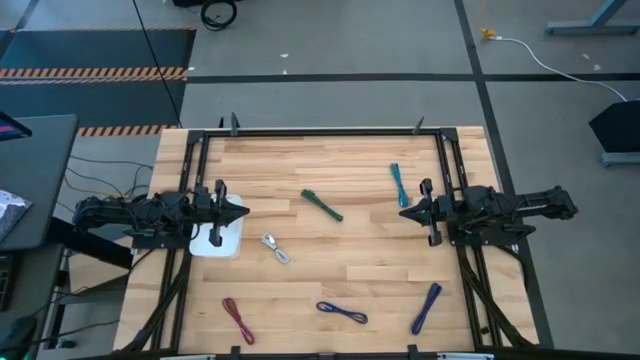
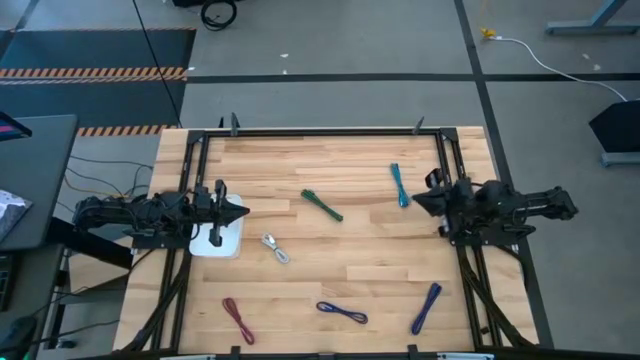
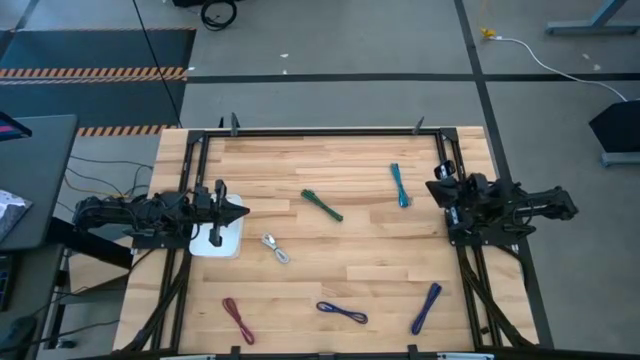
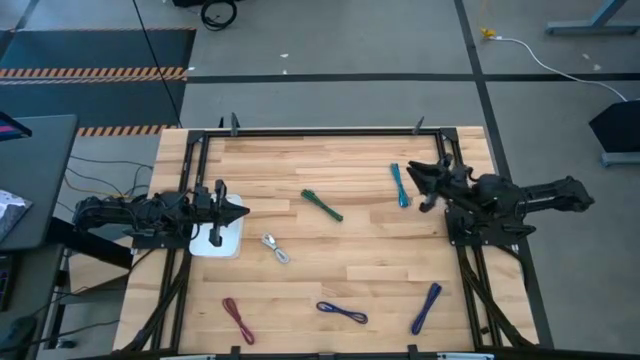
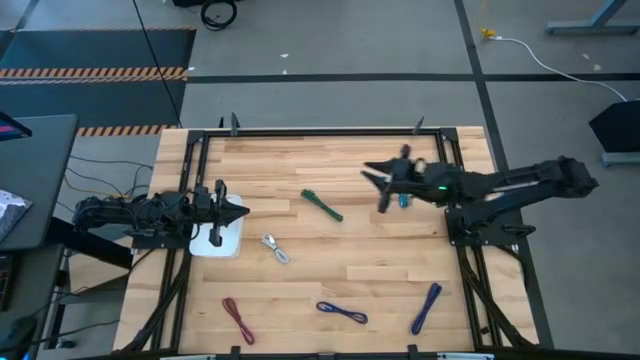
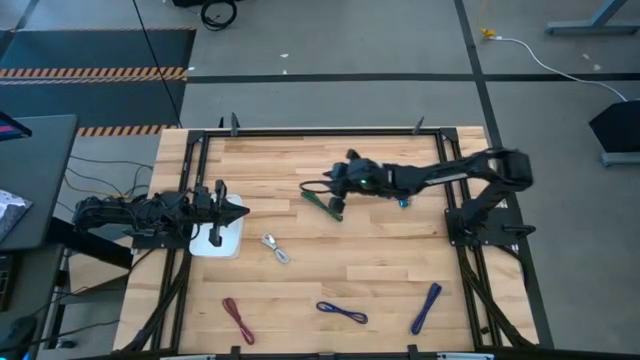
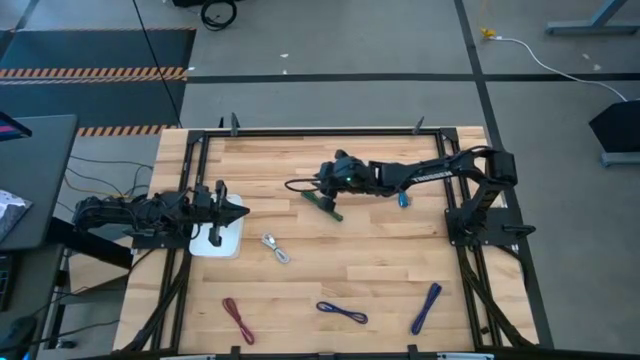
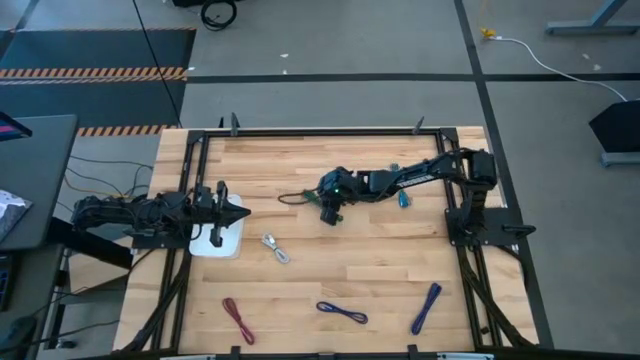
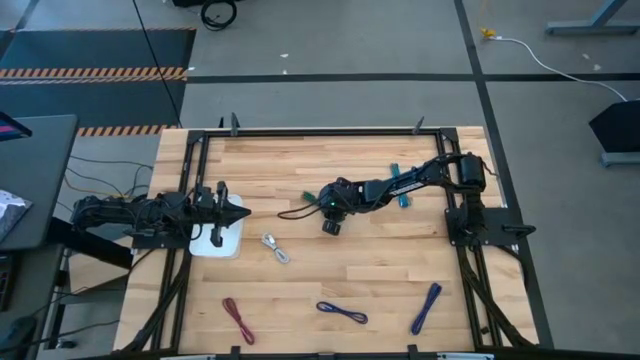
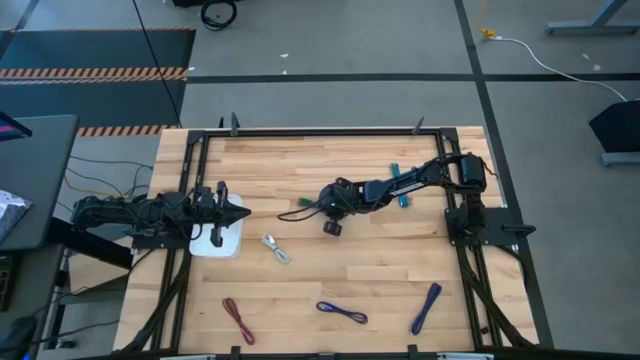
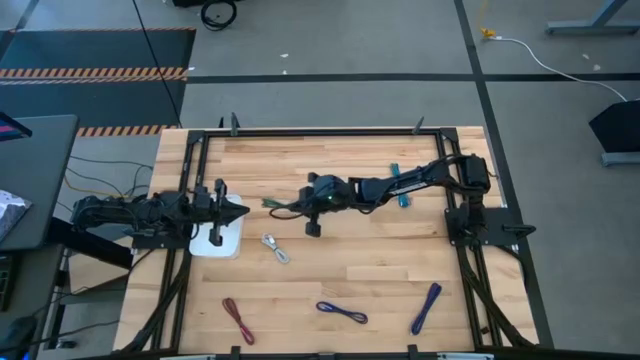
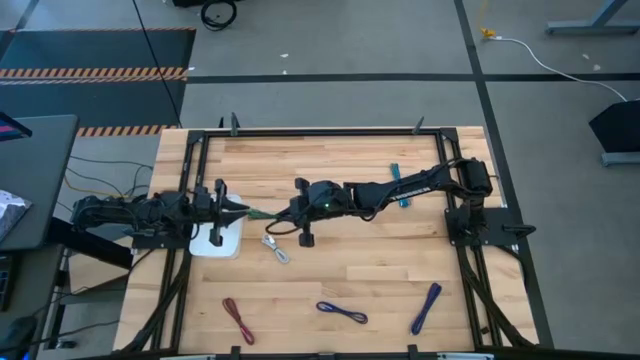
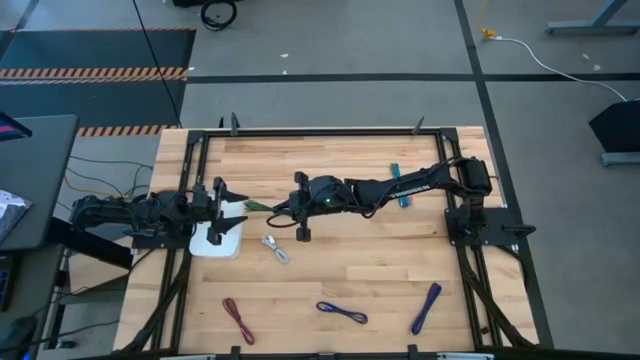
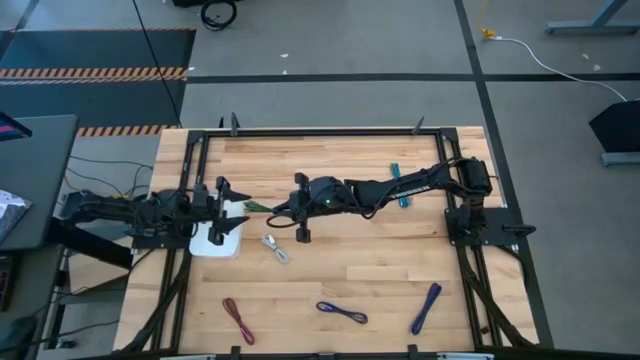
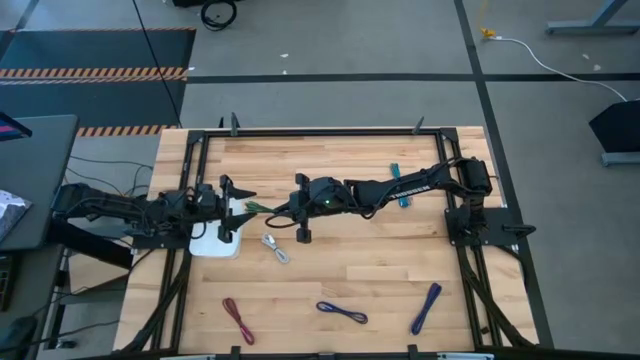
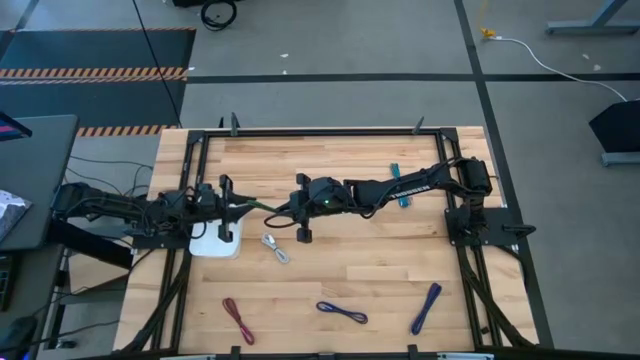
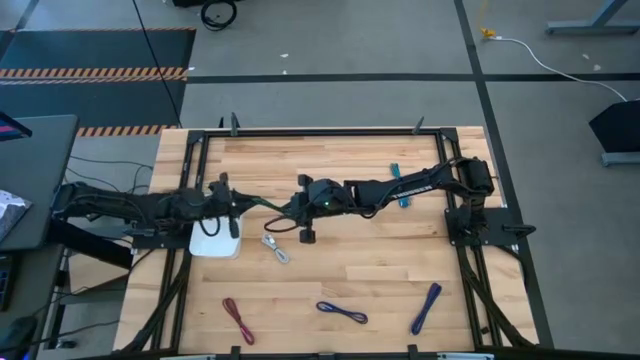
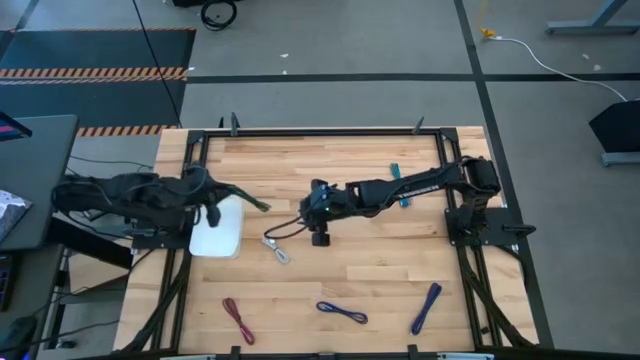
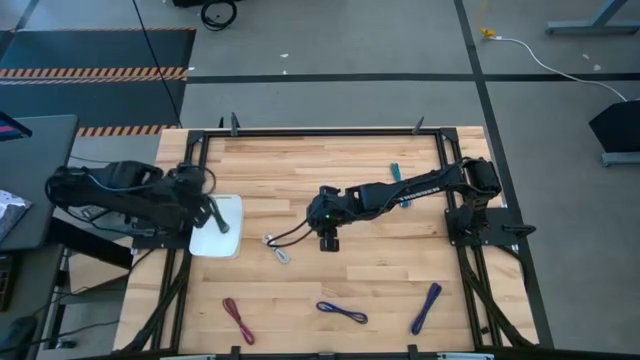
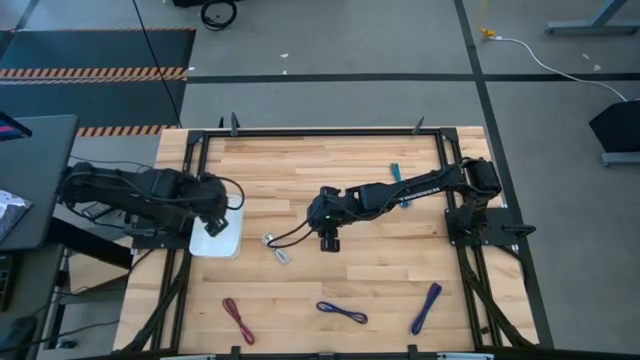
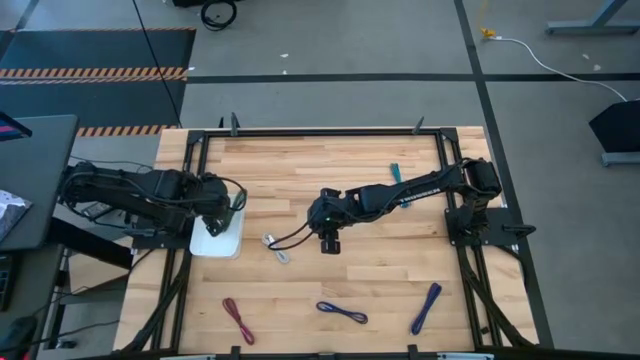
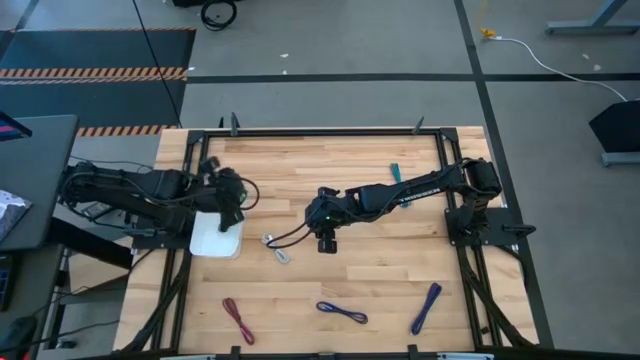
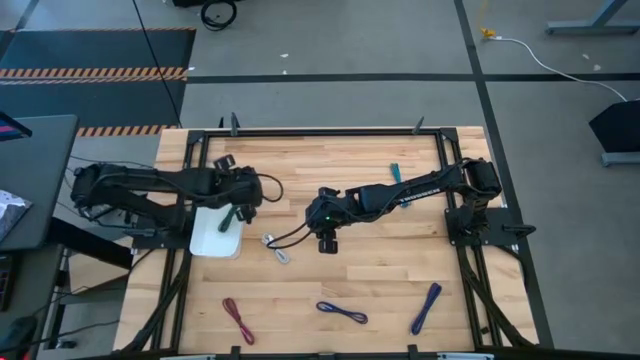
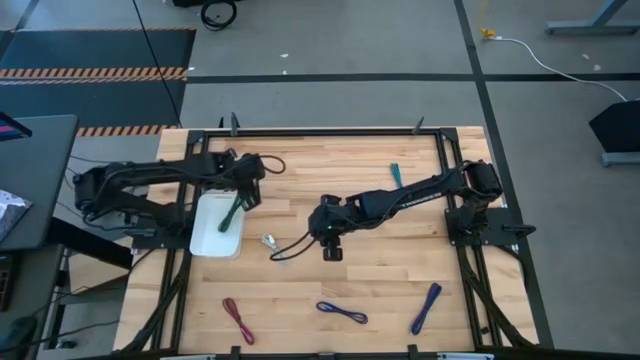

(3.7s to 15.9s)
Task: Pick and place USB-C Cables
Put the green charger cable into the white bin

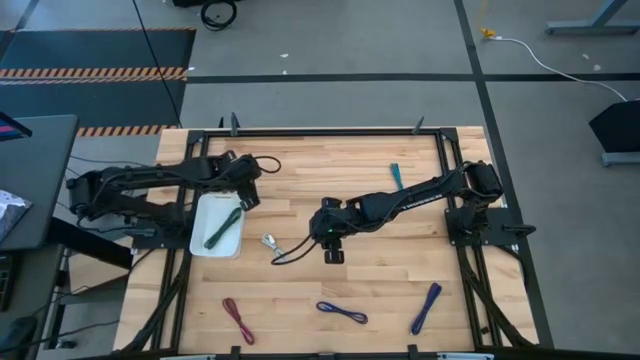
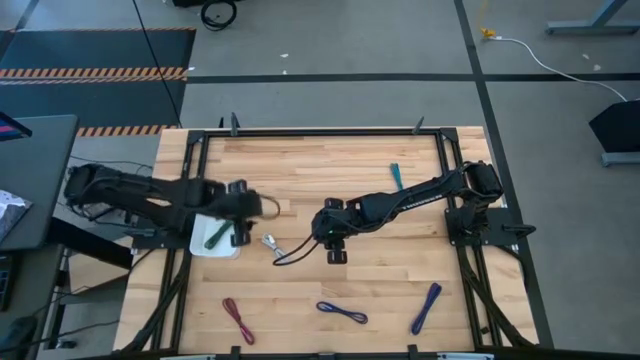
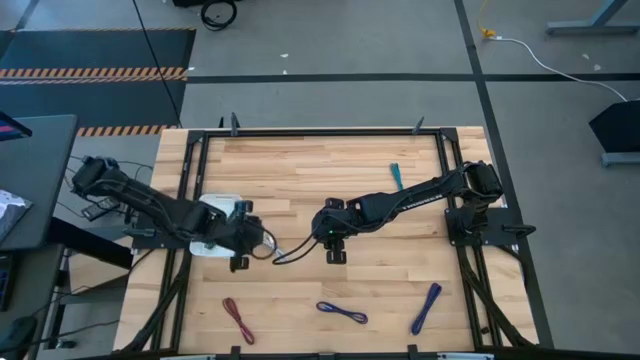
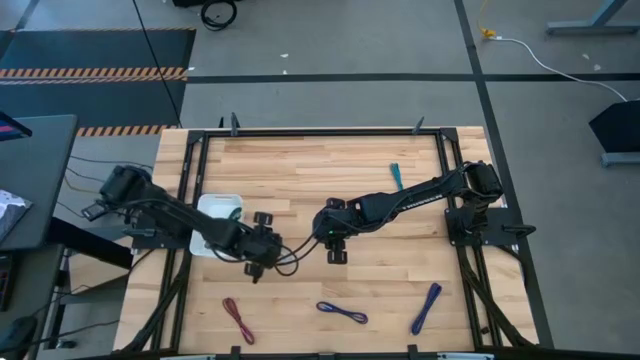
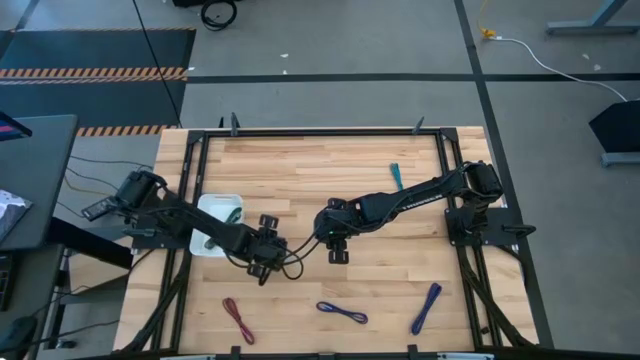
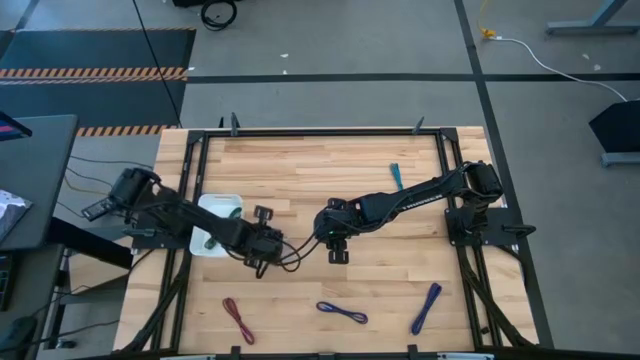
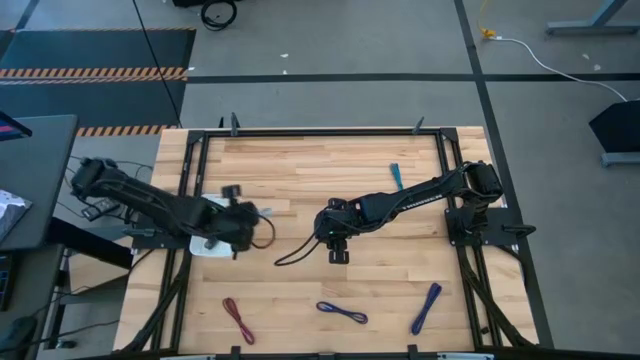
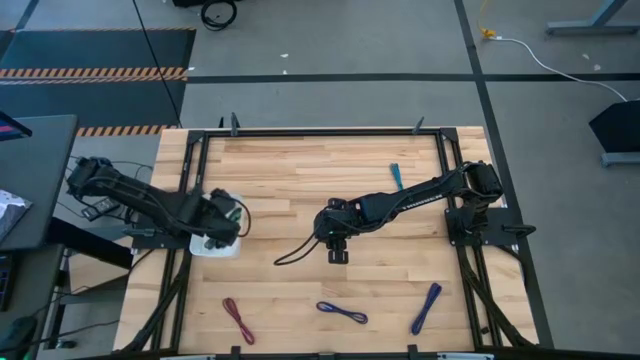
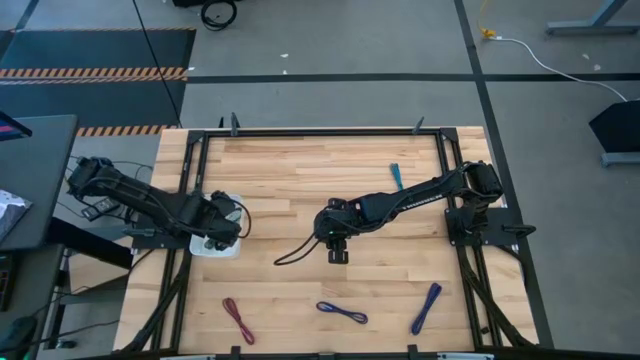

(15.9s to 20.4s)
Put the white charger cable into the white bin

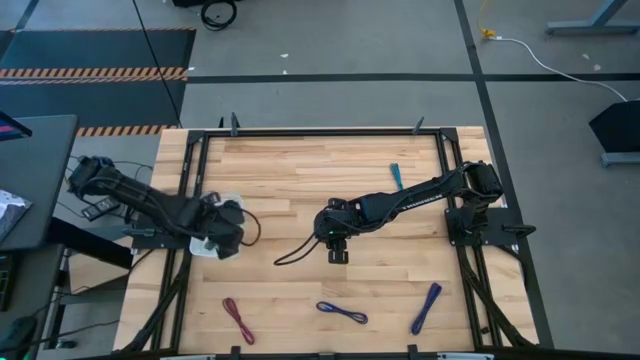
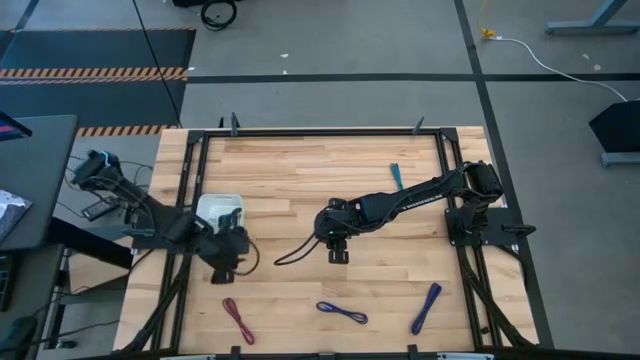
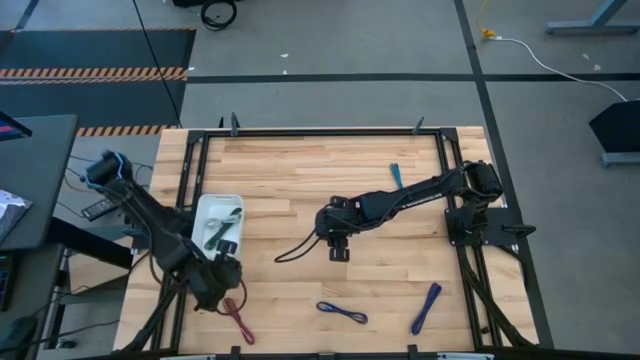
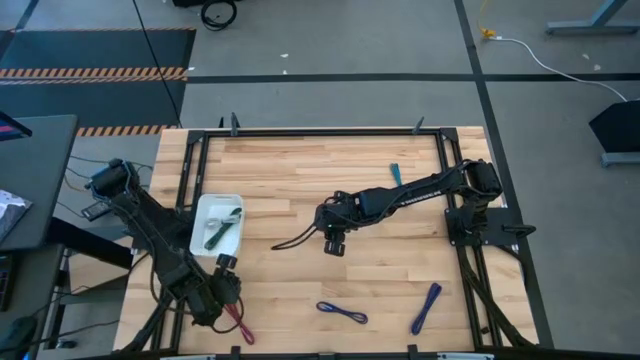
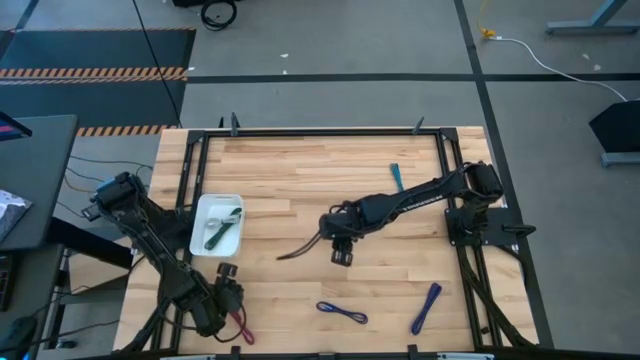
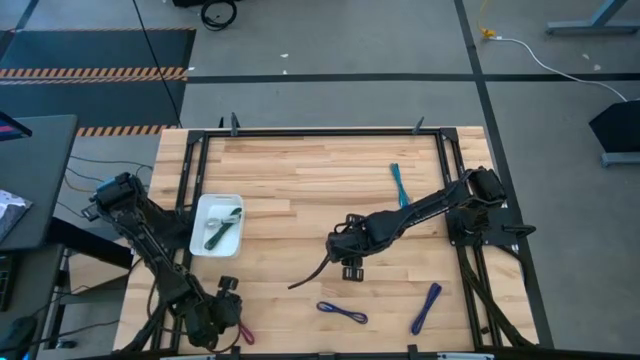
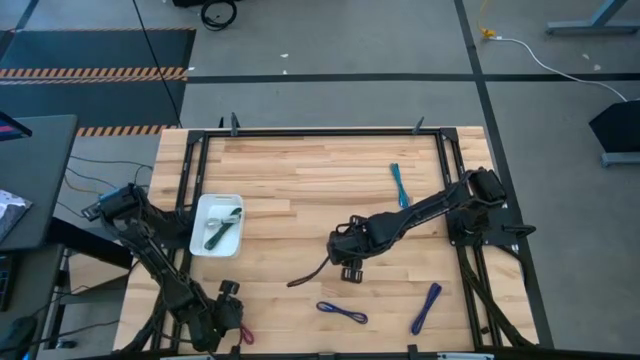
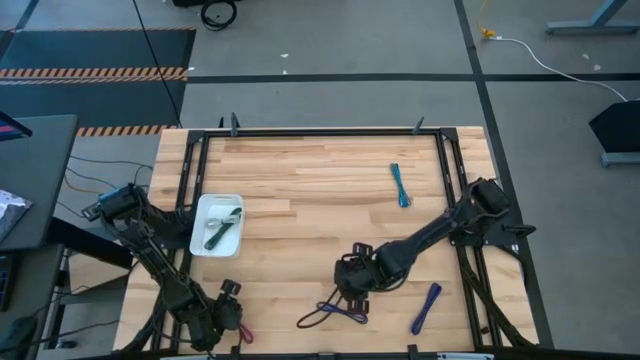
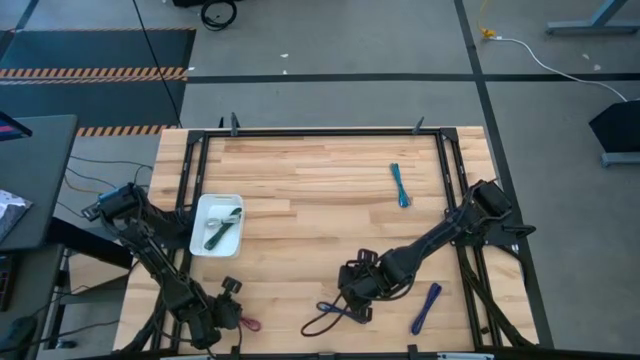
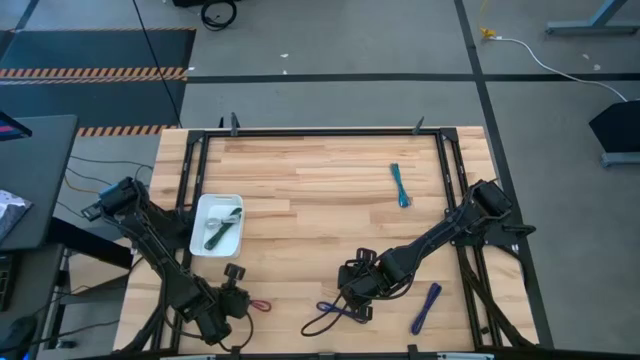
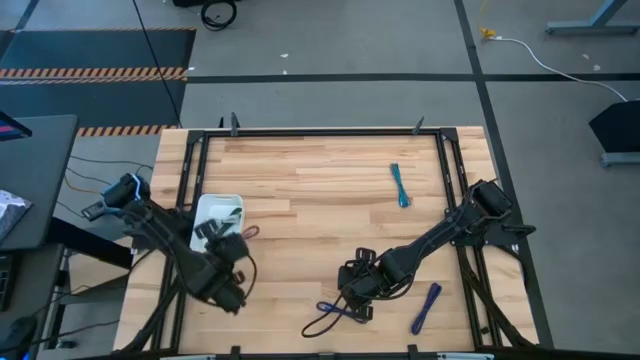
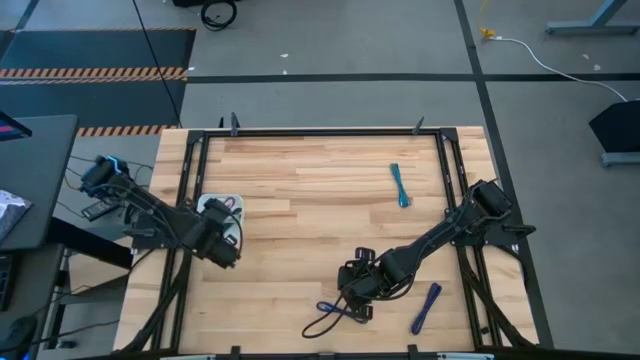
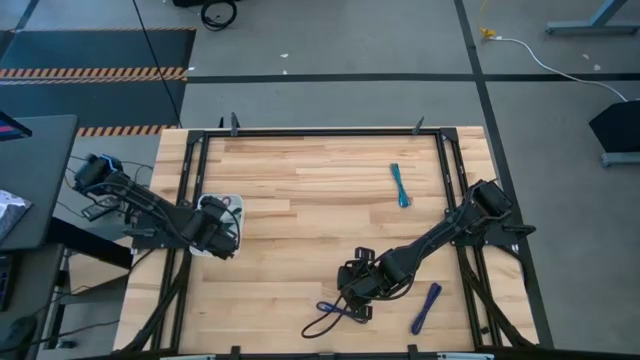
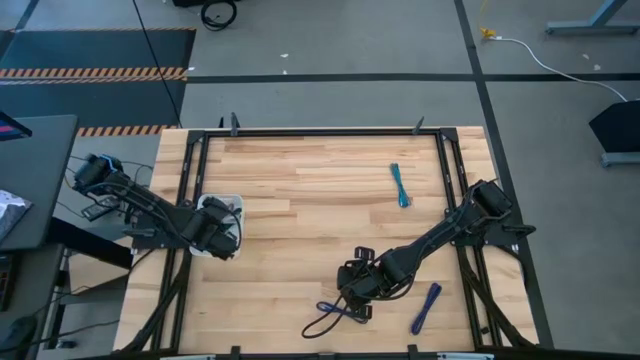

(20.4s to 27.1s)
Put the pink charger cable into the white bin
